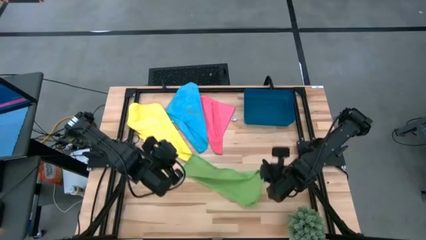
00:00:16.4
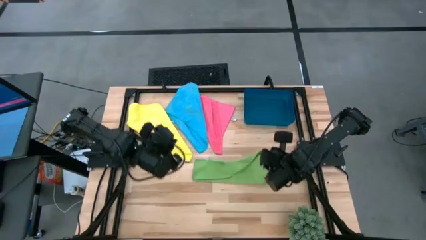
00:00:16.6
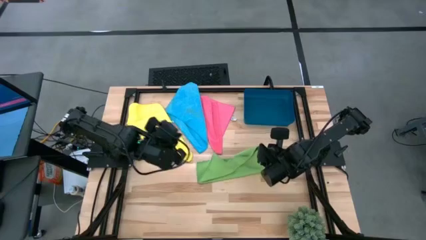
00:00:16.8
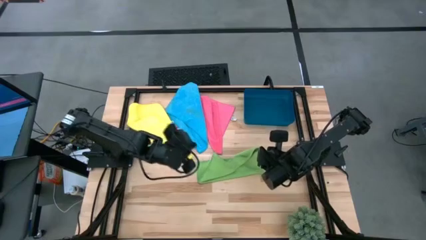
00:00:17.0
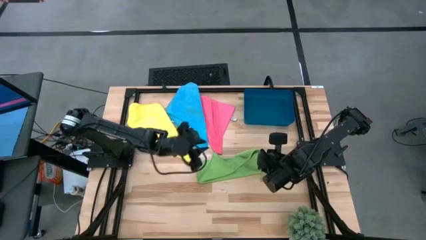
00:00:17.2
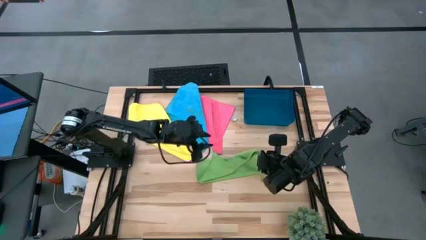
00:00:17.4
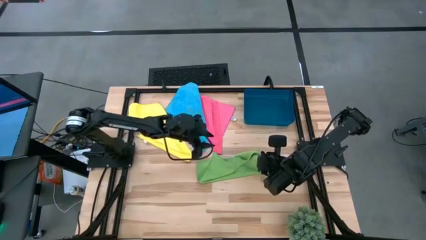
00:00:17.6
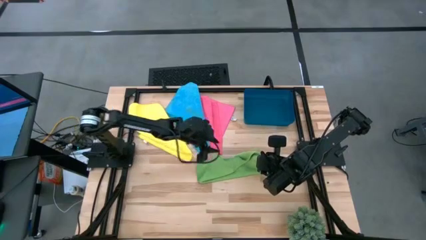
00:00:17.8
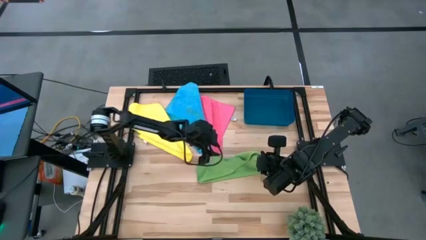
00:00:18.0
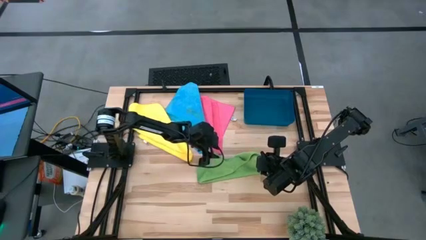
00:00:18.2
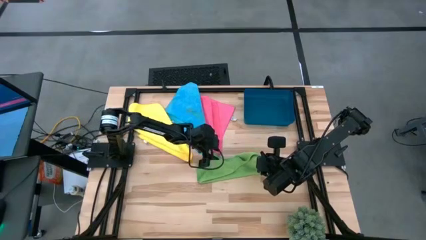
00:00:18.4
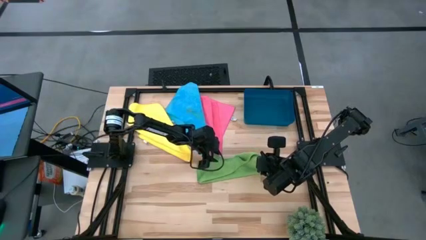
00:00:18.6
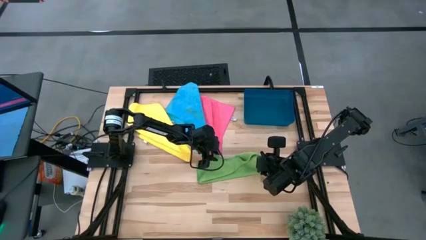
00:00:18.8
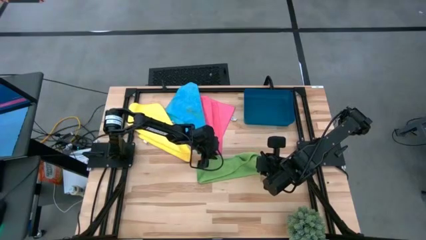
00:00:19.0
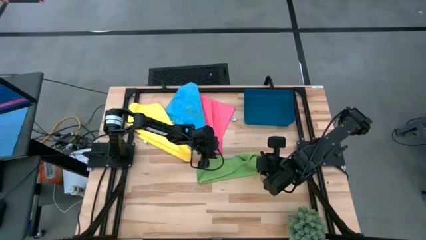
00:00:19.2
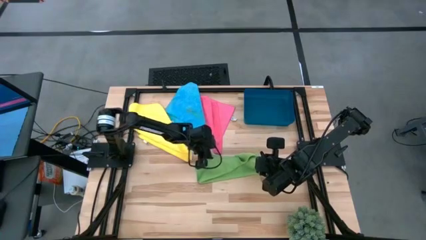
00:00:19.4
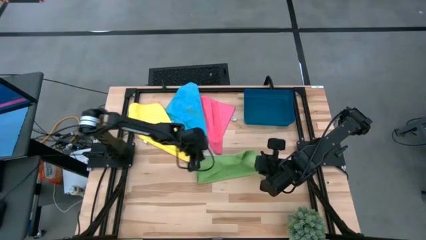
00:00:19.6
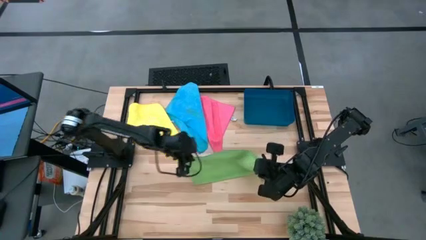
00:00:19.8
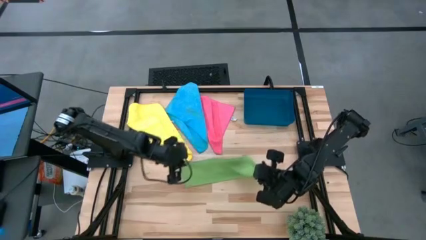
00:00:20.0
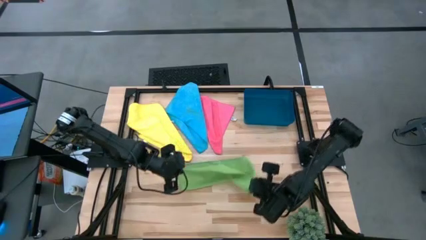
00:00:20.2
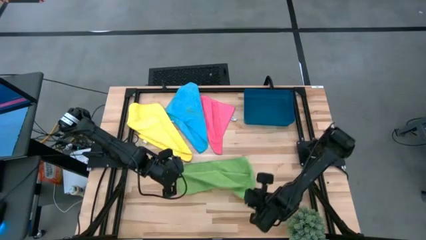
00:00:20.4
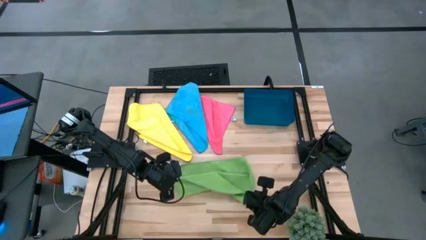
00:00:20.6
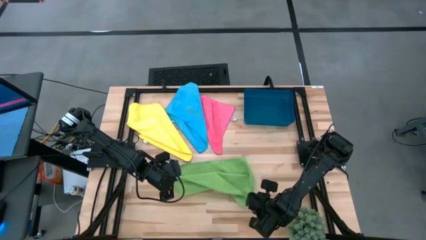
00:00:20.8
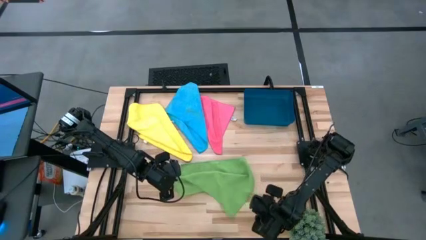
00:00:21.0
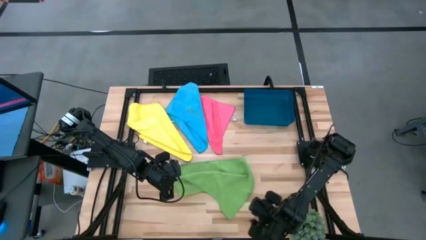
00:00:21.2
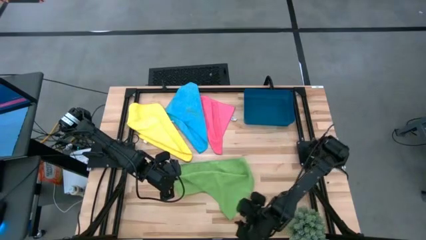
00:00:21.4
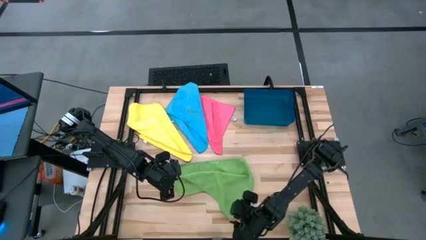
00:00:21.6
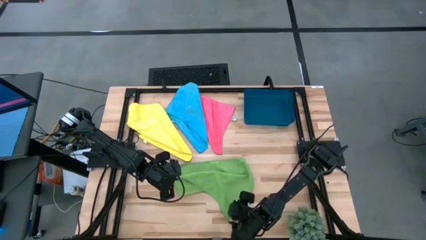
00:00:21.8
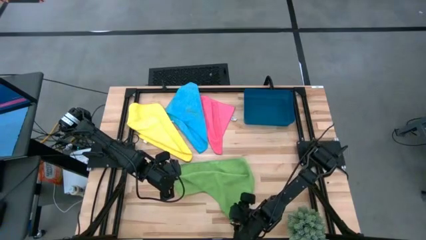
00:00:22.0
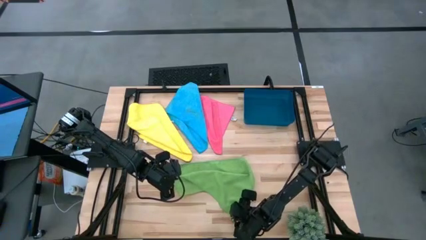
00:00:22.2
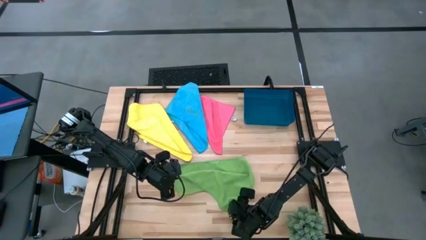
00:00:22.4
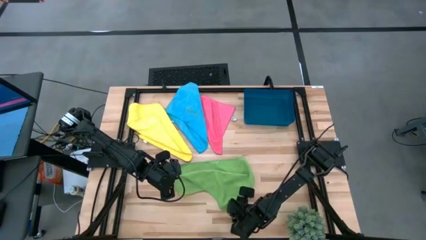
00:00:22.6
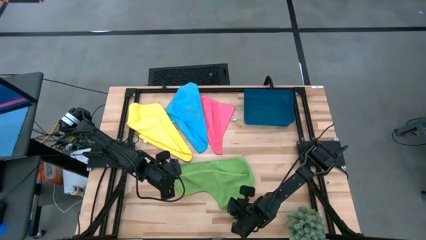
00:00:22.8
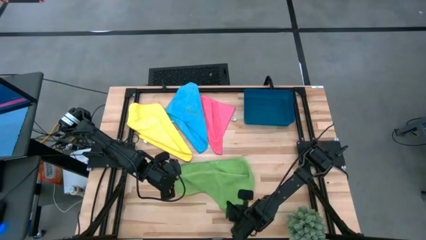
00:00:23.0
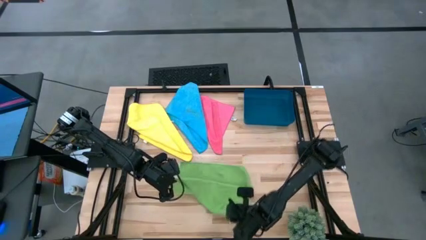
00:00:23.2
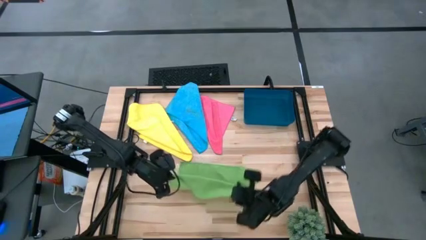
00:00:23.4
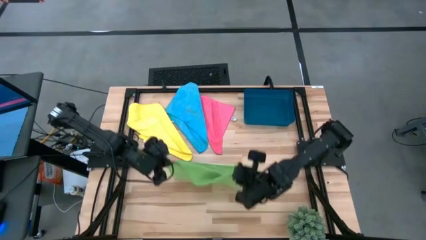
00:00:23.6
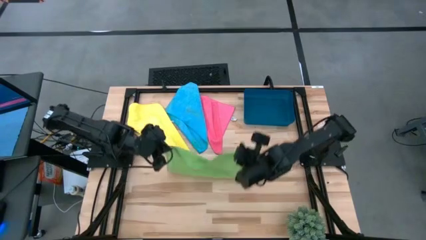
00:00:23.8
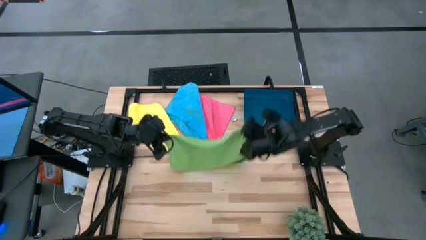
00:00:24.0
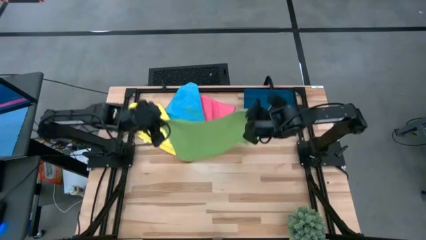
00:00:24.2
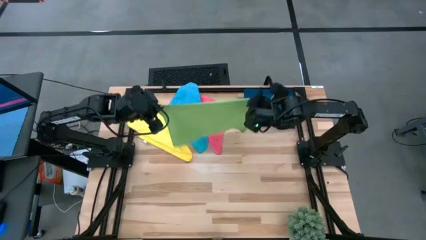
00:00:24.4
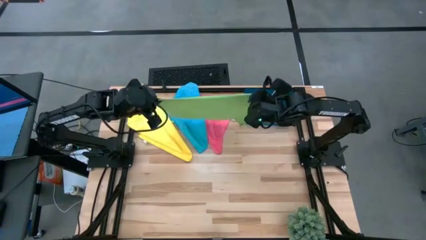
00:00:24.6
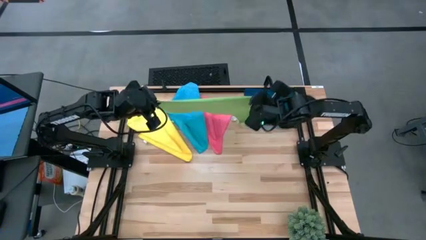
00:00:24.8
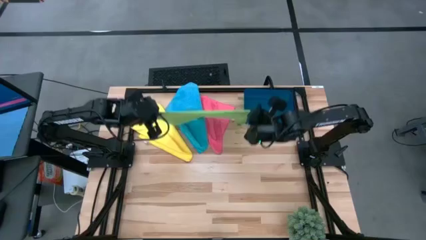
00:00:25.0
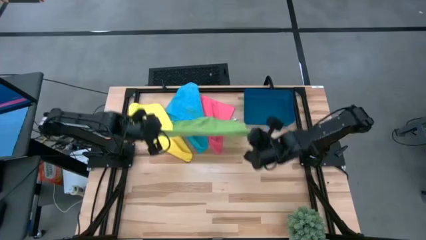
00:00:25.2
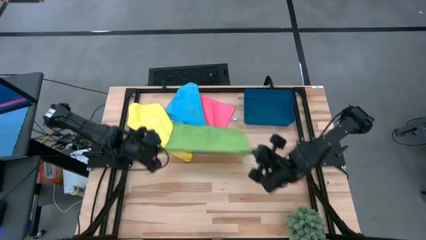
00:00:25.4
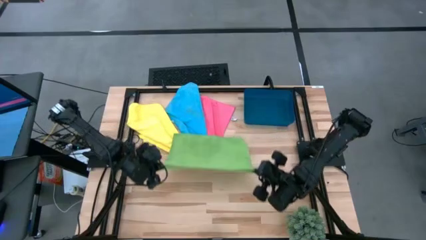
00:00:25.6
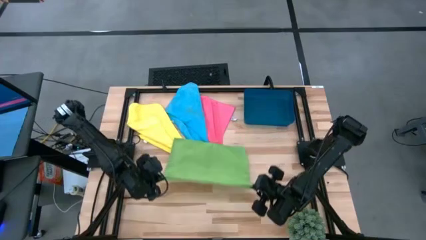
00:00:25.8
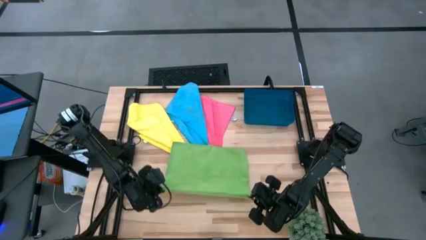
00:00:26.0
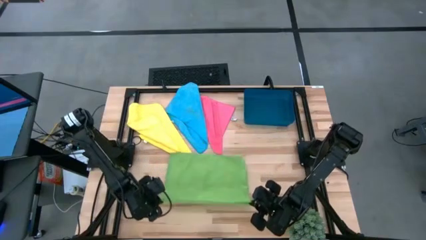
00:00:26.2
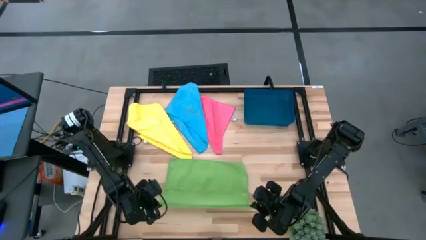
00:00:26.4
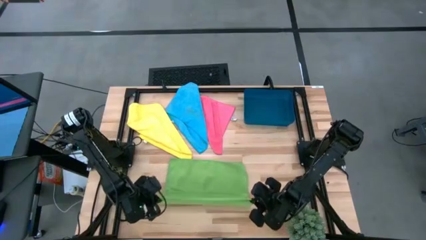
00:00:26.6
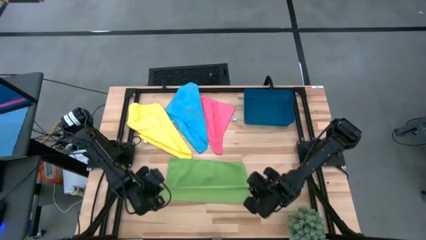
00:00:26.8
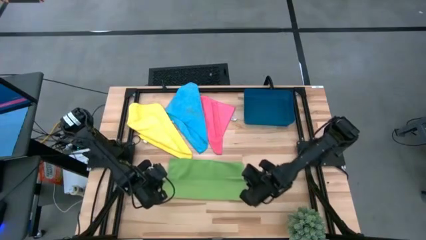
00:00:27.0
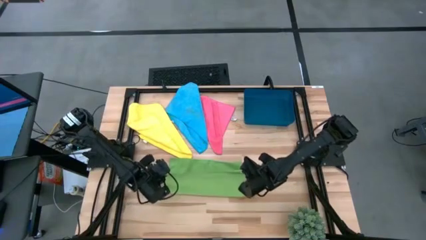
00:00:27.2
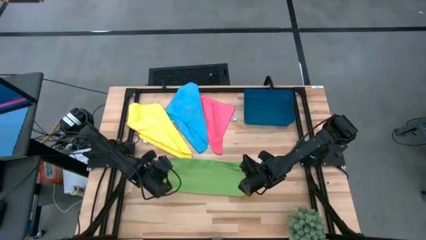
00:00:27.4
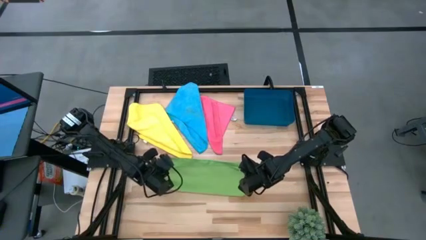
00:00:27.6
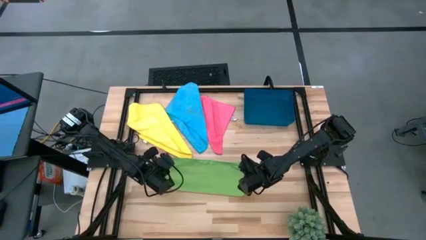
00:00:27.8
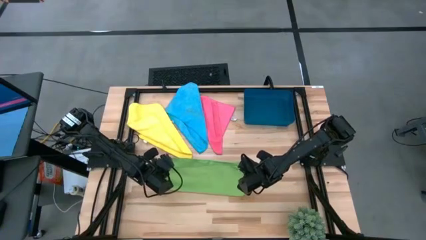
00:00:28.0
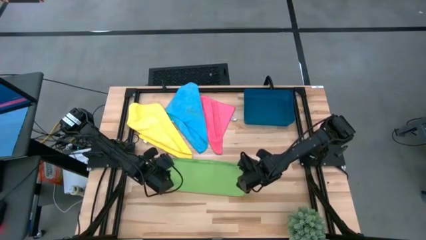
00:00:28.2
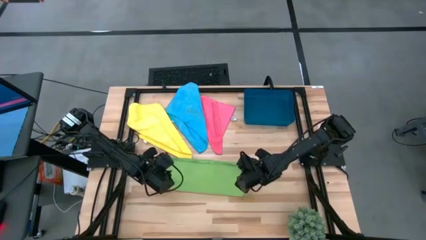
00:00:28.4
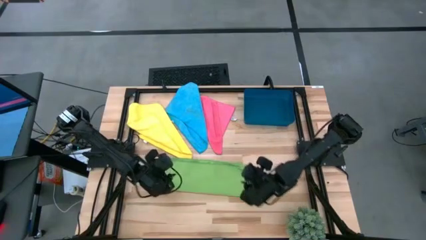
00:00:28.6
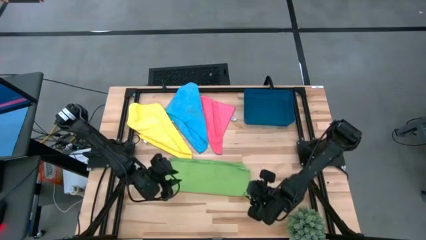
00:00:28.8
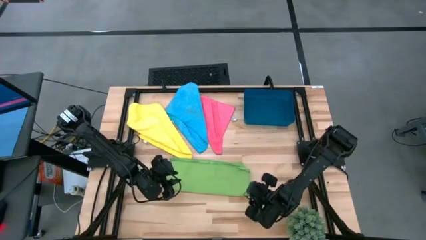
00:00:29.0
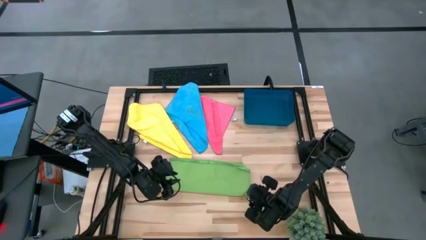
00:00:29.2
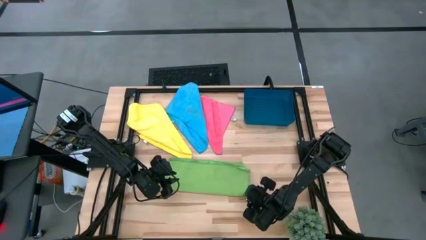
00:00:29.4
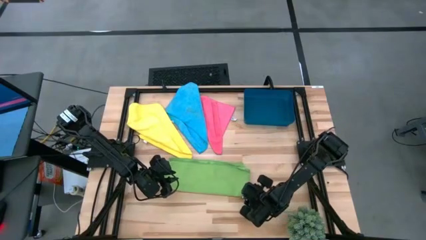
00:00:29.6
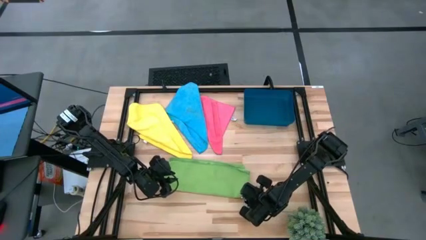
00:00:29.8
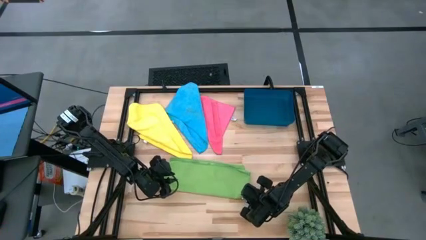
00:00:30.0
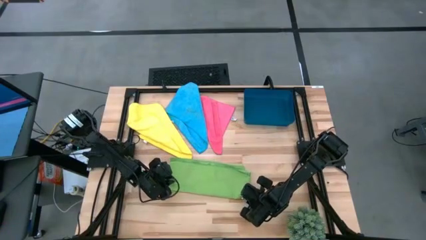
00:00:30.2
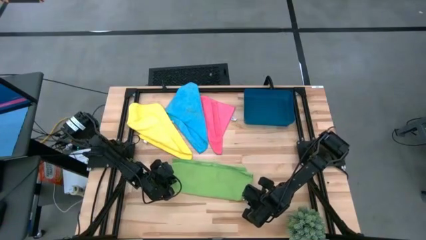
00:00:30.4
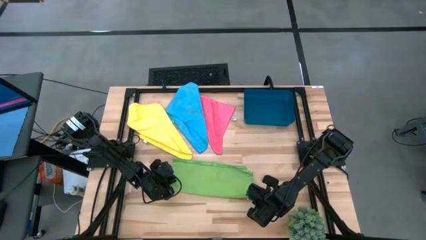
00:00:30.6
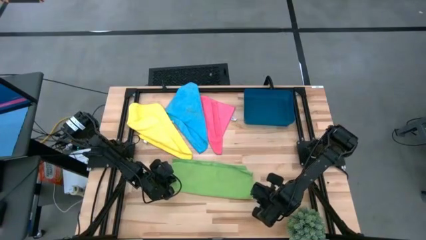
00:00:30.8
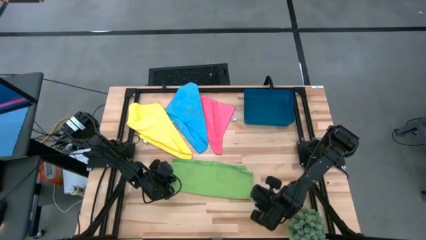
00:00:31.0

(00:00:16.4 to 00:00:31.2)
Task: Fold microfiber towels
Fold the green microfiber towel

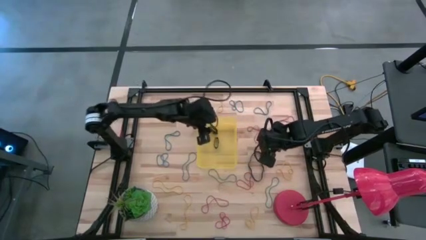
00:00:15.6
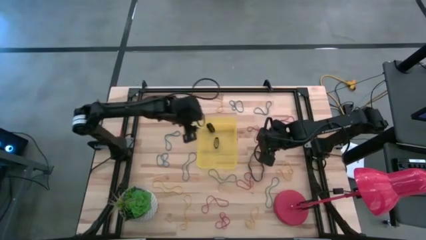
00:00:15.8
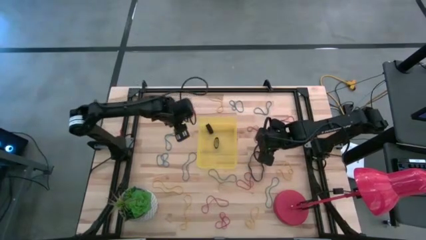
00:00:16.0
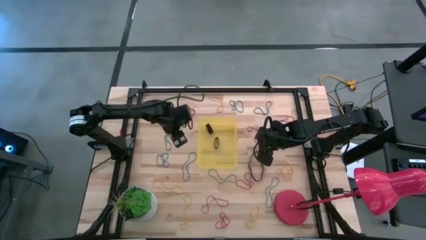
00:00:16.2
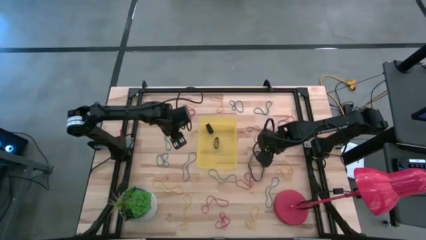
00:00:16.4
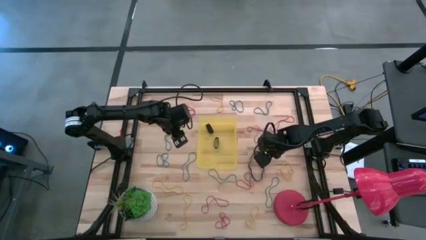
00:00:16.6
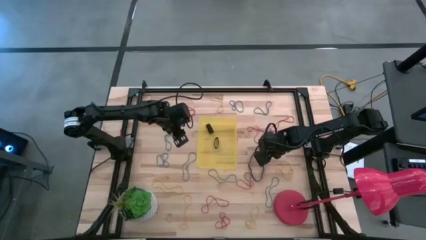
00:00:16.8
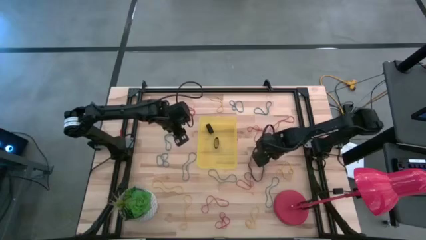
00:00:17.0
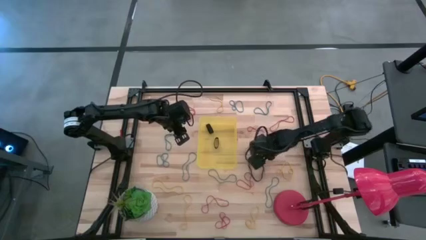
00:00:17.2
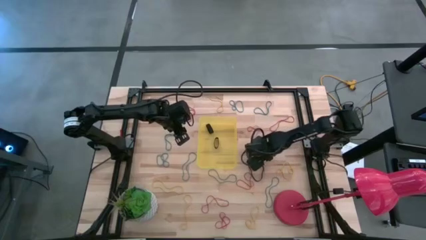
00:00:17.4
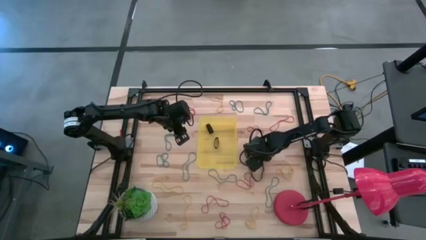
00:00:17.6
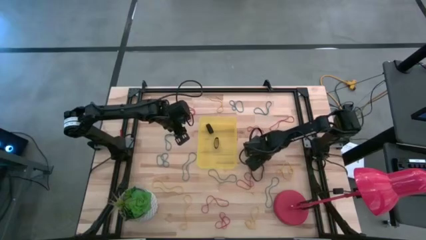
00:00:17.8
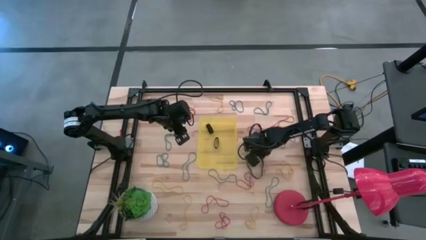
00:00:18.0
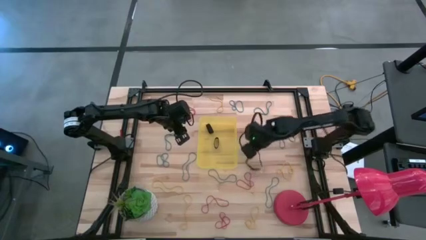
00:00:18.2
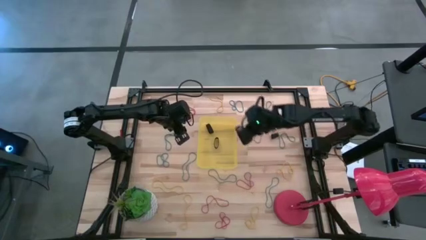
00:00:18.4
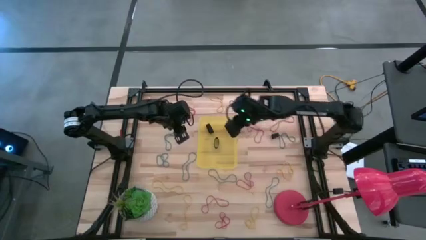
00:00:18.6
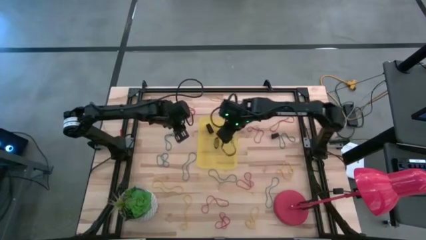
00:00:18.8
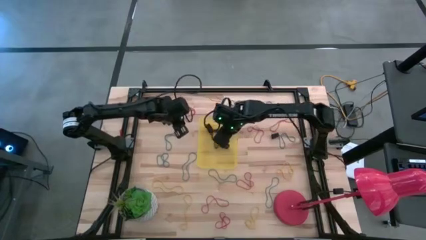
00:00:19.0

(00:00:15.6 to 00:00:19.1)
Task: Pick and place rubber bands into bin
Put the black rubber band into the yellow bin
